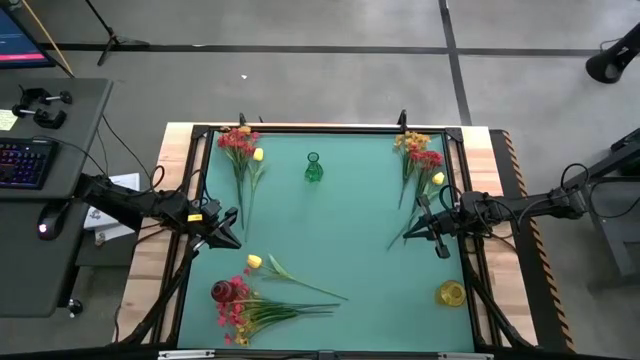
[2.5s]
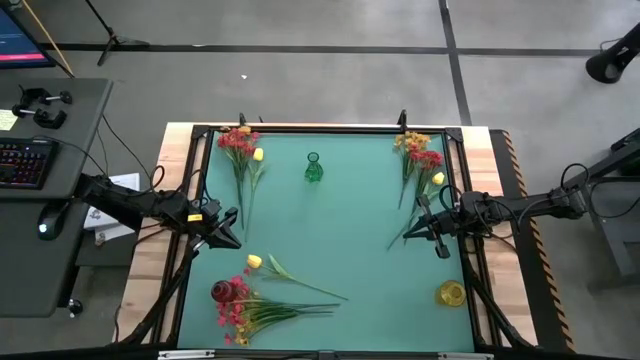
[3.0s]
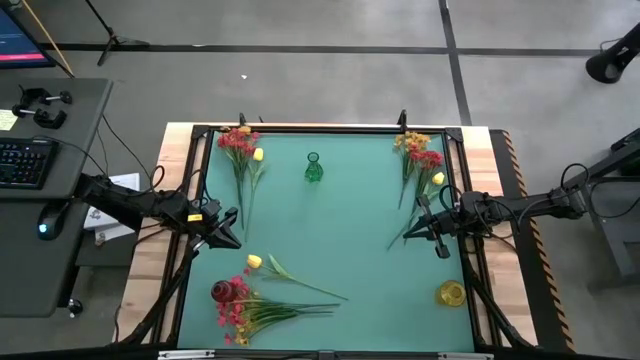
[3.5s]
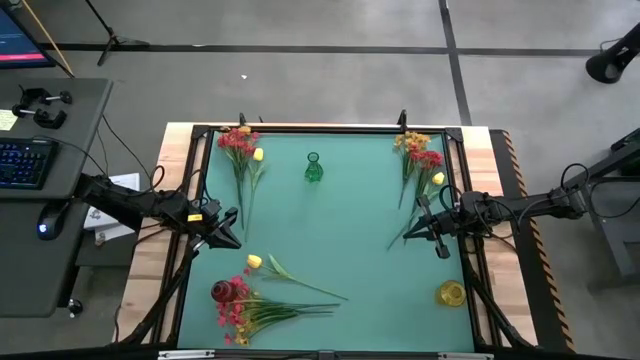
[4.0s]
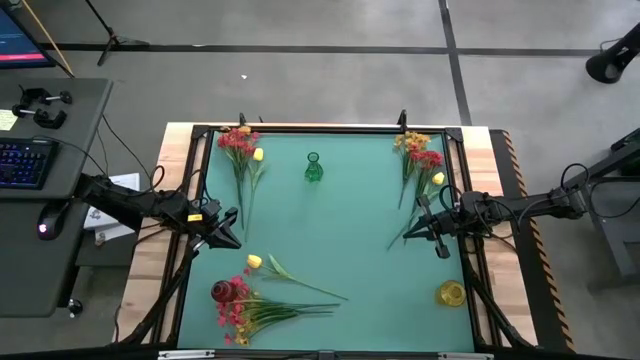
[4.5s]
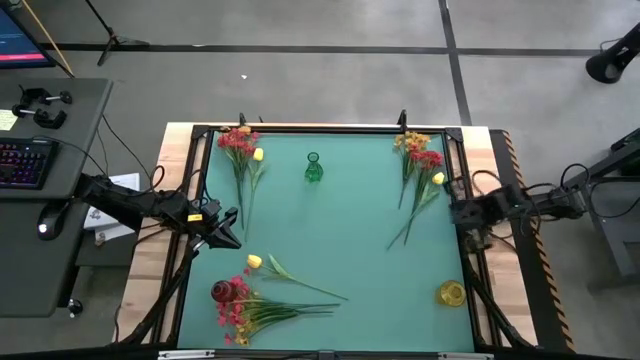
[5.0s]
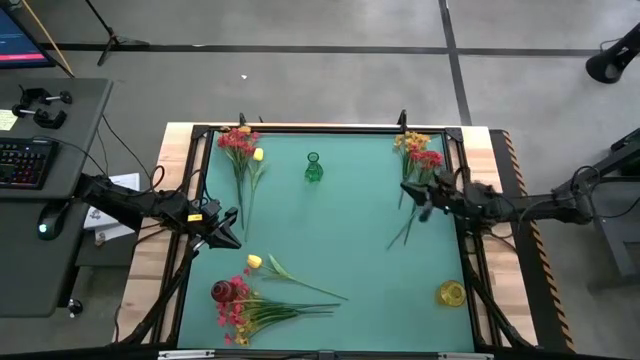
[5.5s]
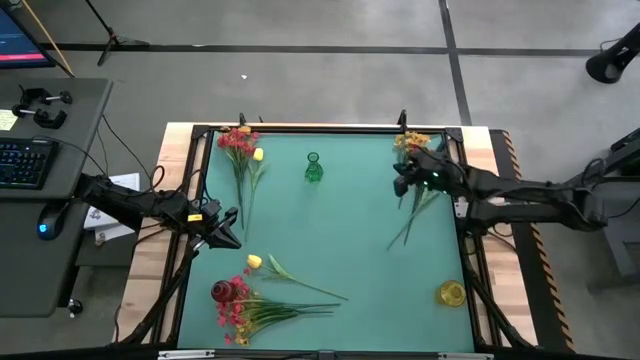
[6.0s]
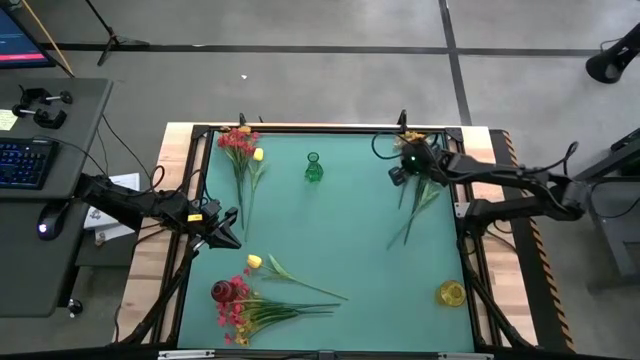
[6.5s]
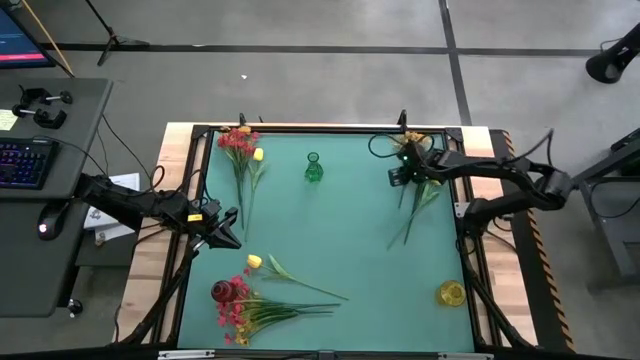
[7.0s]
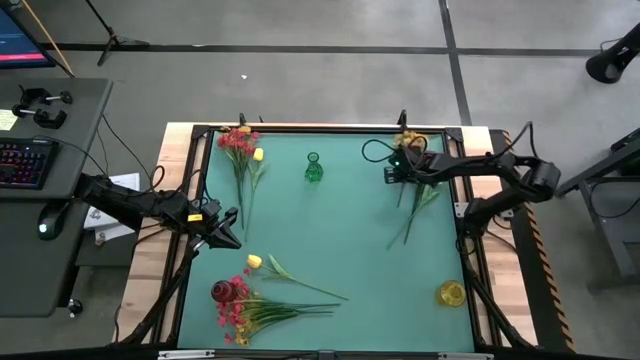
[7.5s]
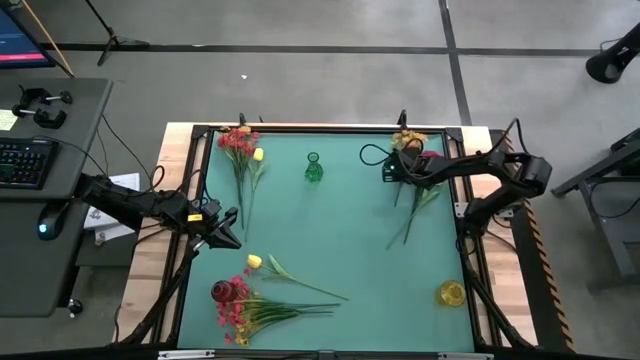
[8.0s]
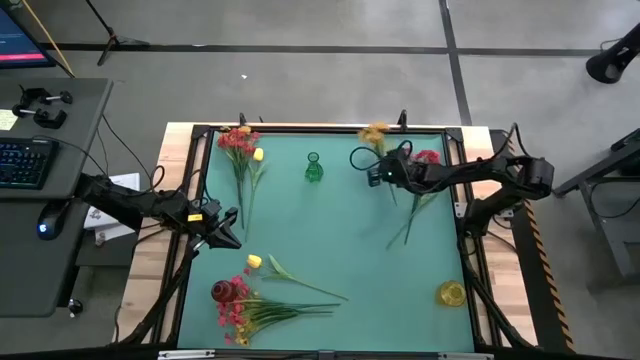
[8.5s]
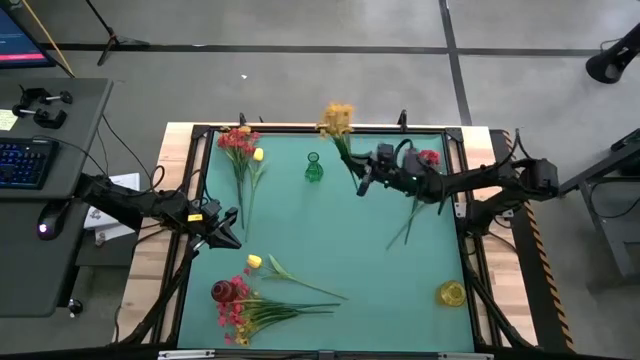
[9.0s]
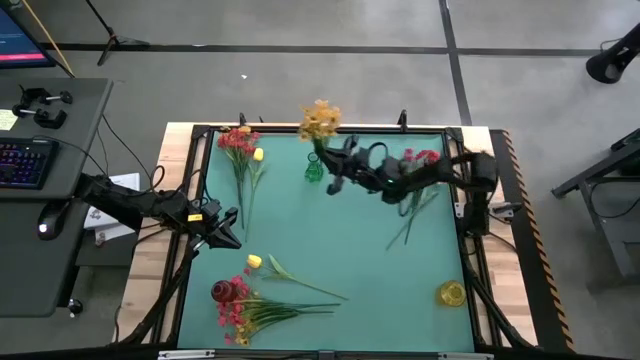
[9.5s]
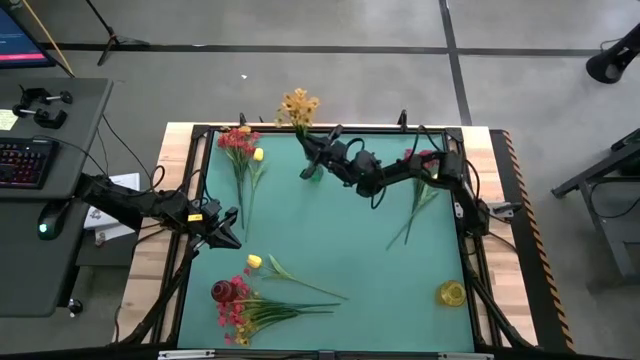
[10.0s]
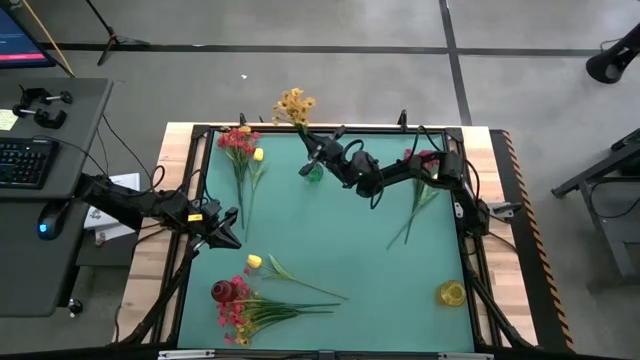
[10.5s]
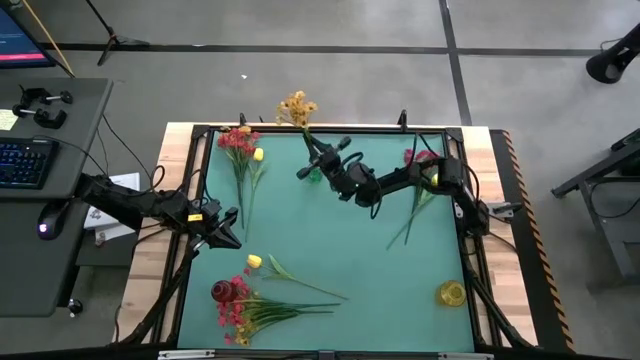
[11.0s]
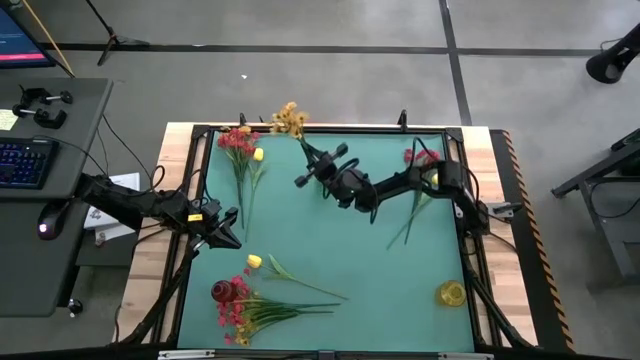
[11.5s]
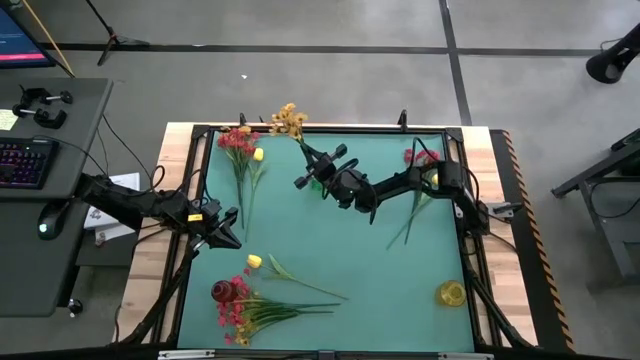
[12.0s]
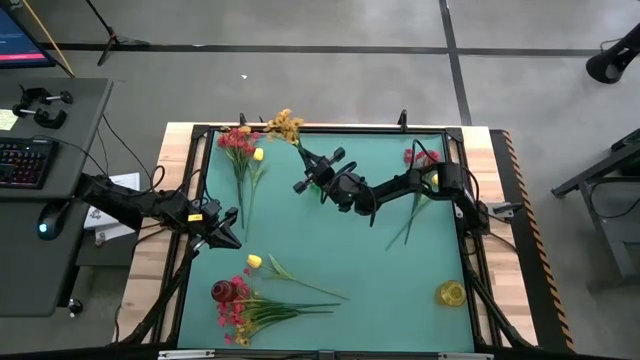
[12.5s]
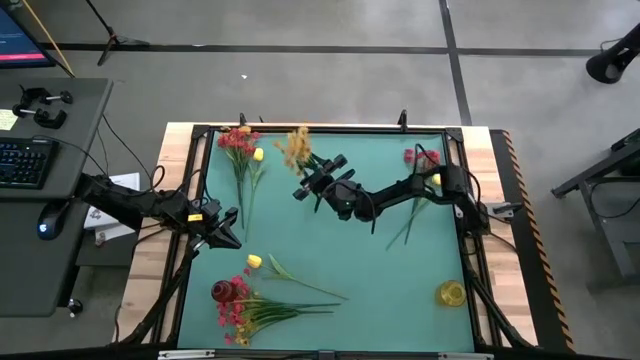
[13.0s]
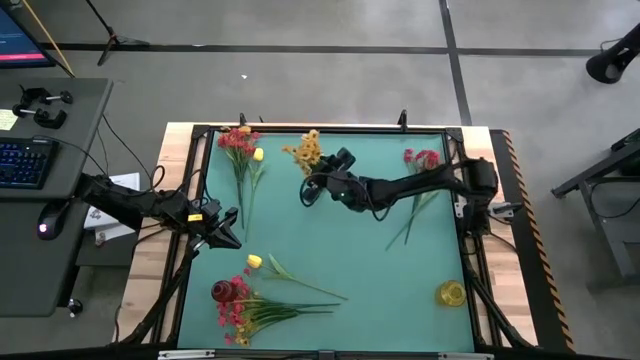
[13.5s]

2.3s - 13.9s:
Task: Sort flowers into vase by color
Put the right yellow flower into the green vase

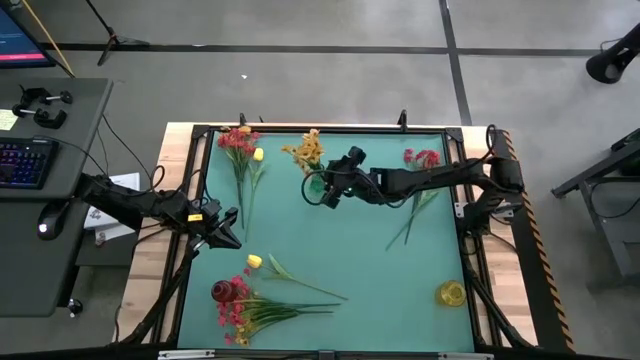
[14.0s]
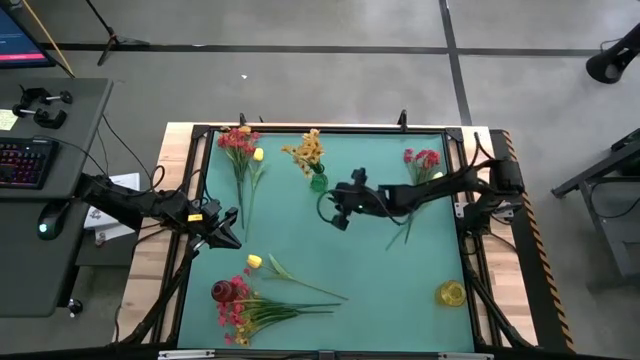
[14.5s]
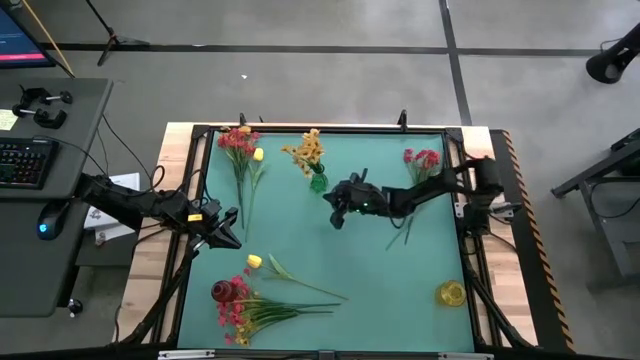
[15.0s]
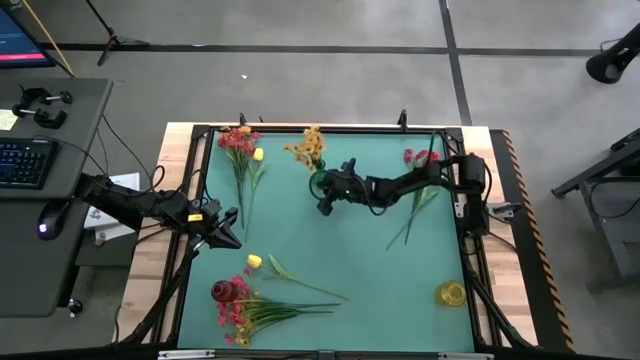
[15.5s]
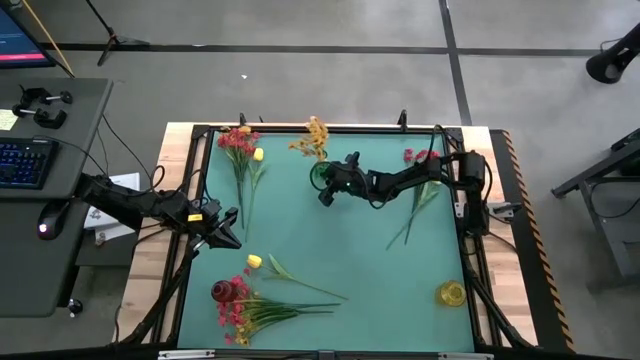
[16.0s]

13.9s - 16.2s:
Adjust the green vase on the table

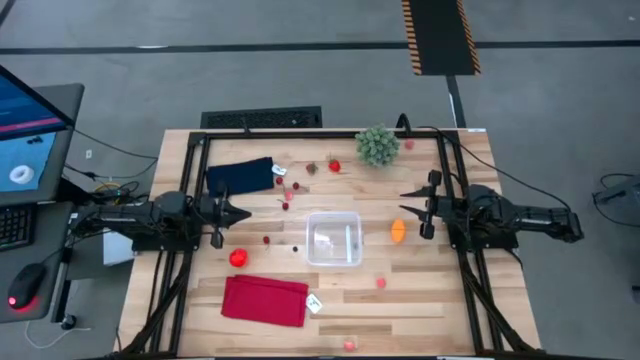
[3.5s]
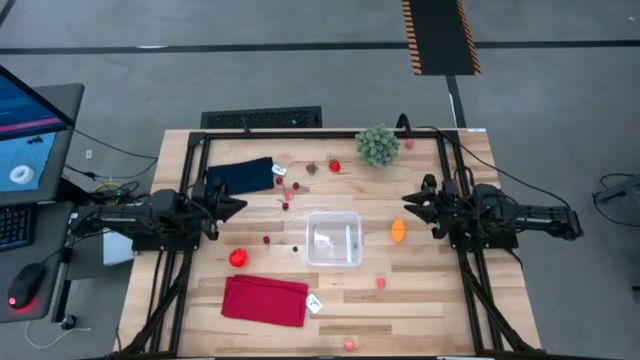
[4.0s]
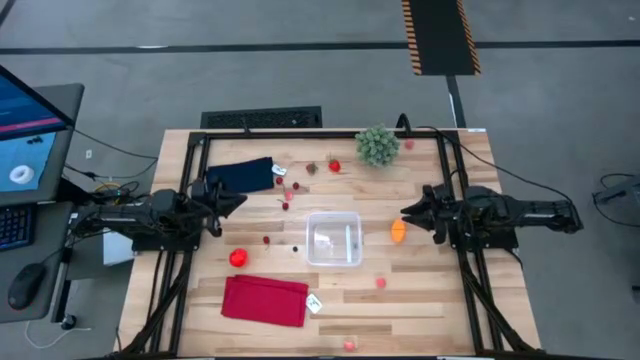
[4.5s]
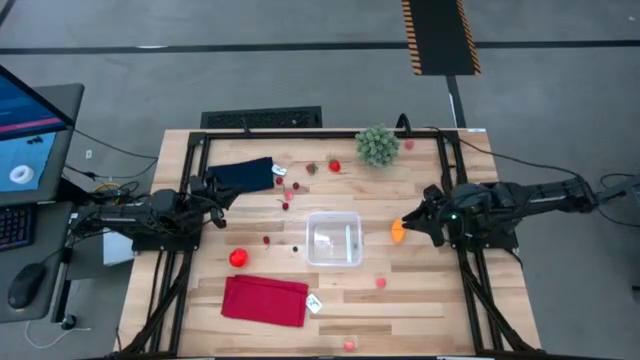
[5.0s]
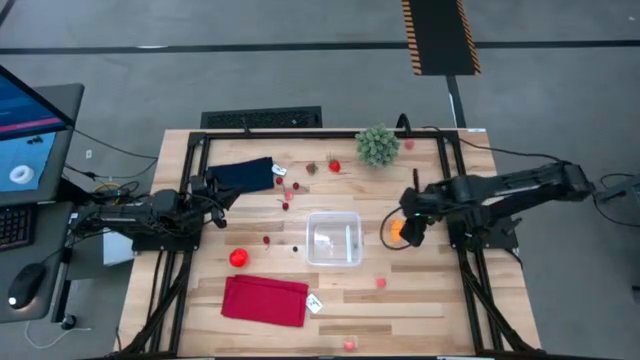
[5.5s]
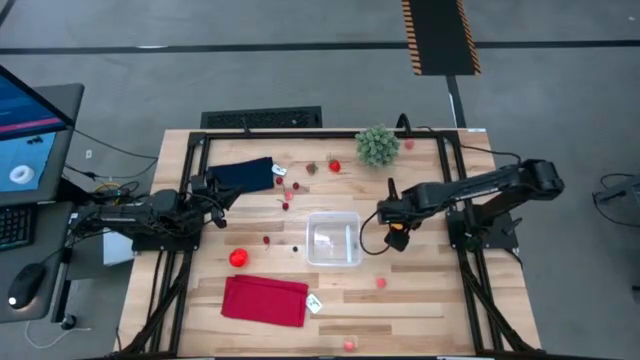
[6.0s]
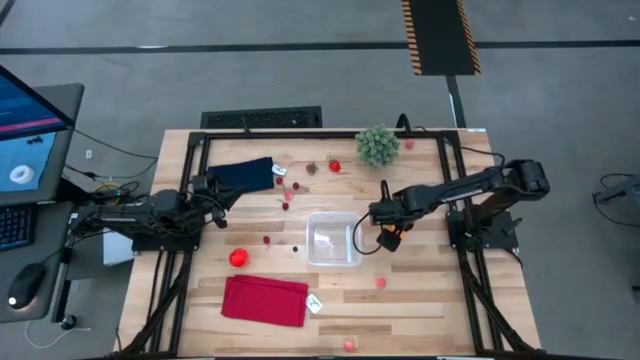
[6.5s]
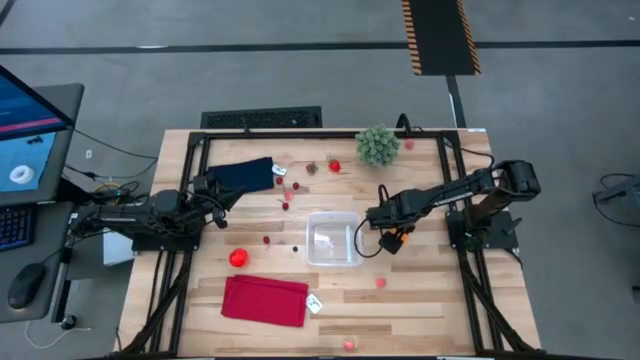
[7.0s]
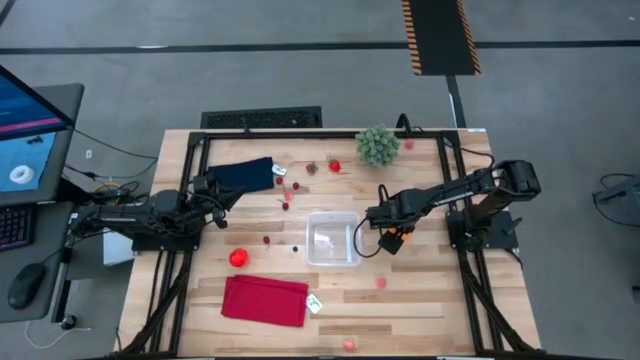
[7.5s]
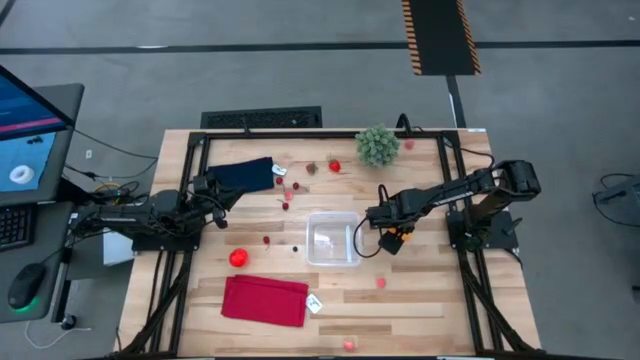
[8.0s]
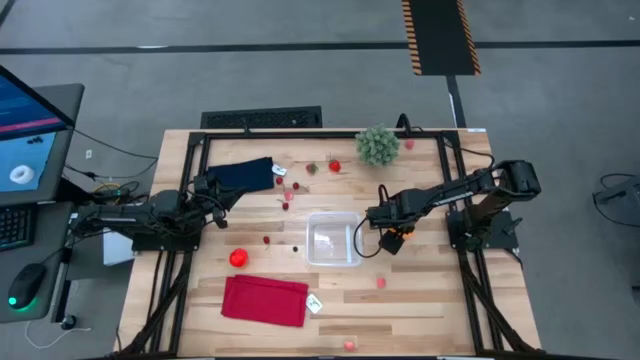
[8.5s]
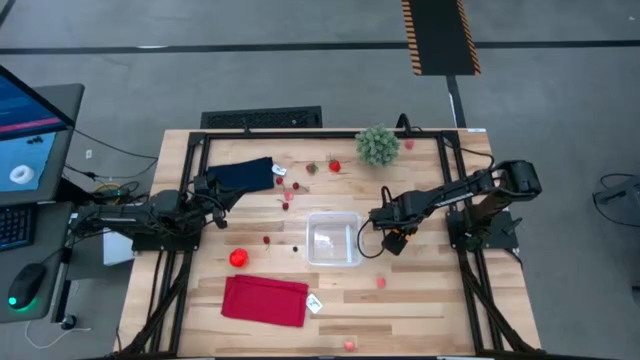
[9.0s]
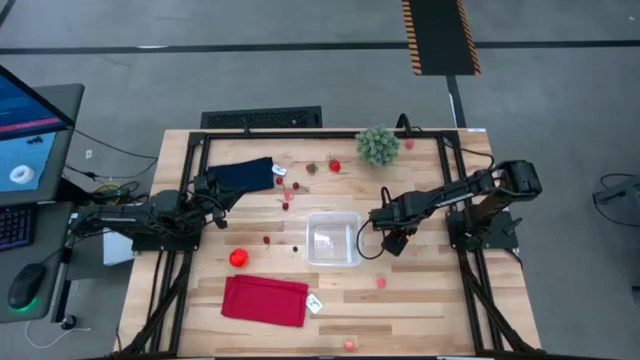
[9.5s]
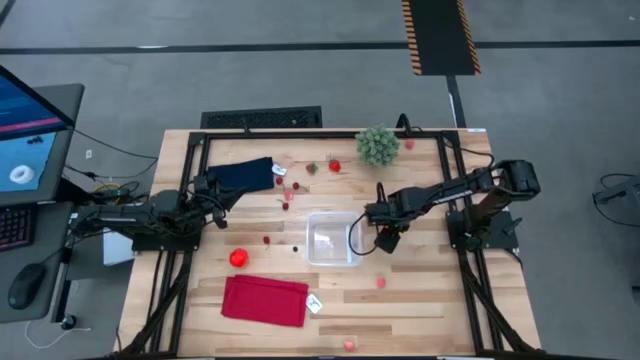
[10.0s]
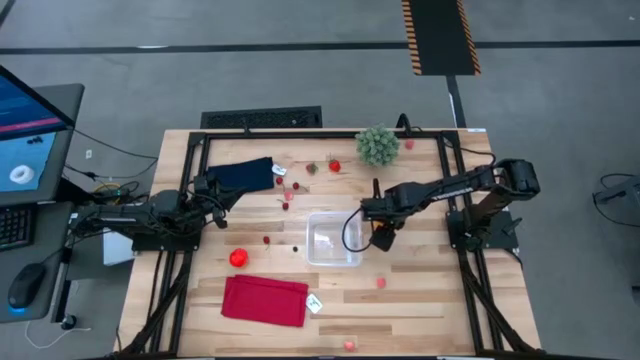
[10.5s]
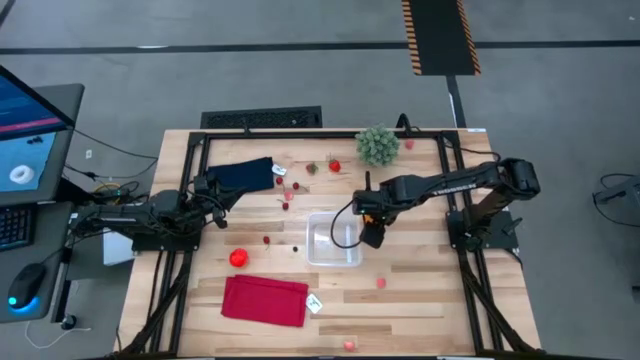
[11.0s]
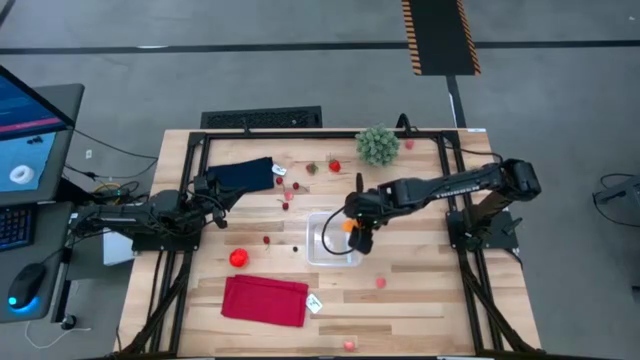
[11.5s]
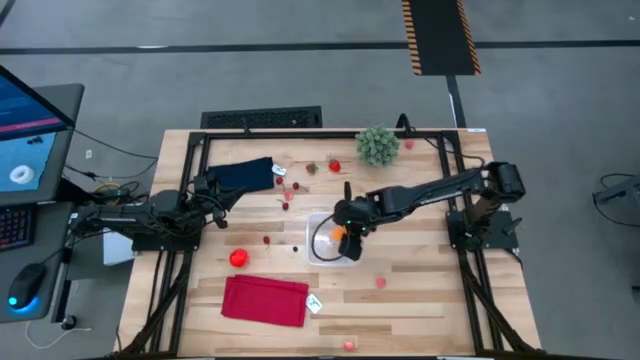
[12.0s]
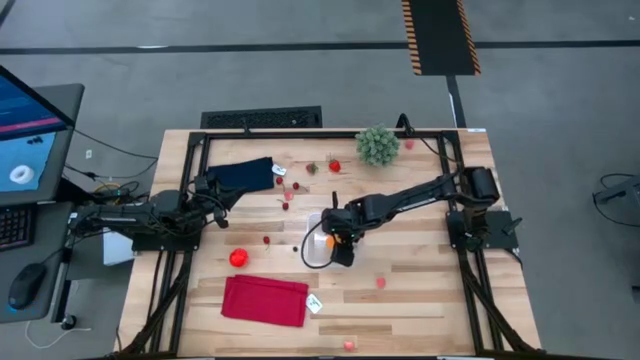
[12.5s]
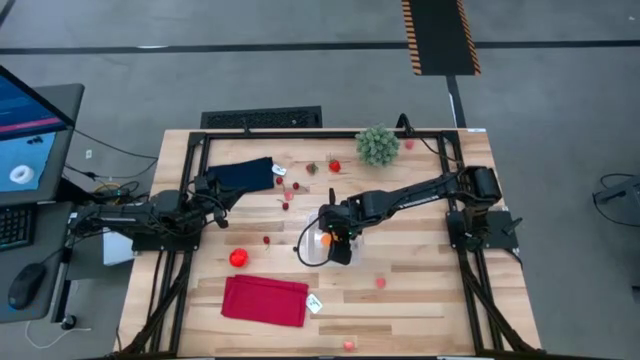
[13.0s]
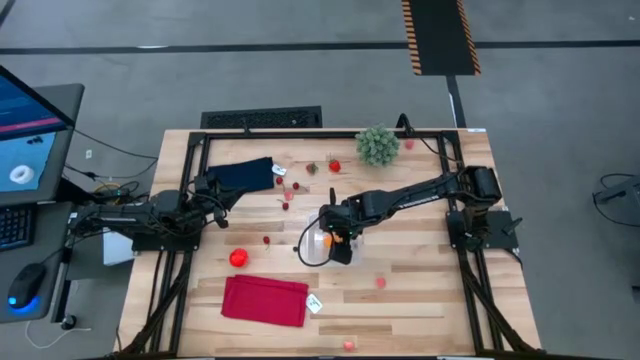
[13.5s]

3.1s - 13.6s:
Task: Pick and placing Produce into tupperware
Put the yellow croissant into the transparent bin
